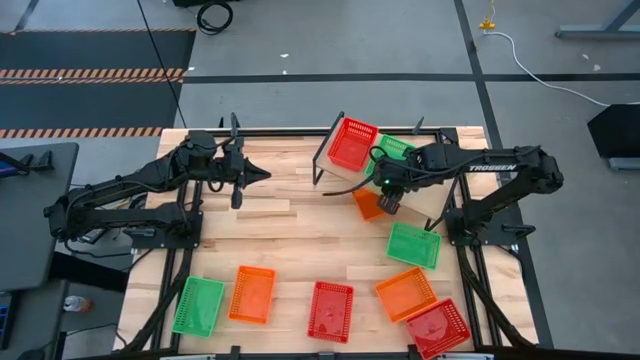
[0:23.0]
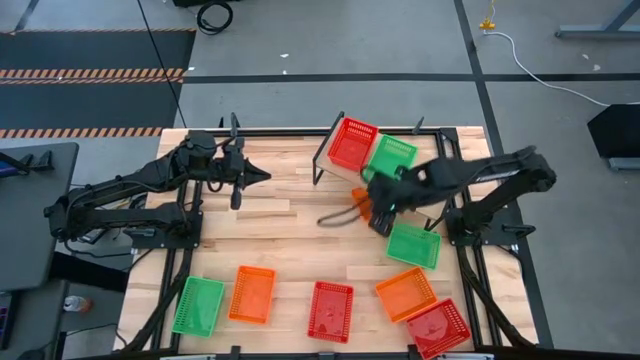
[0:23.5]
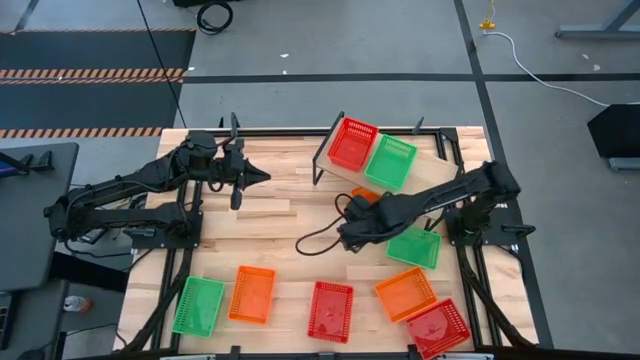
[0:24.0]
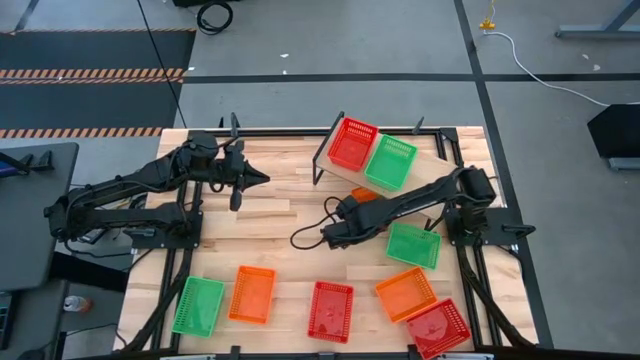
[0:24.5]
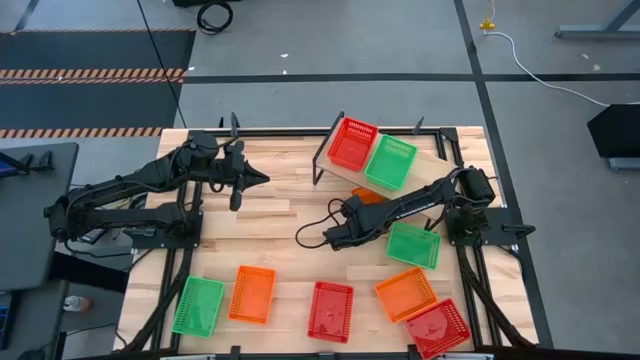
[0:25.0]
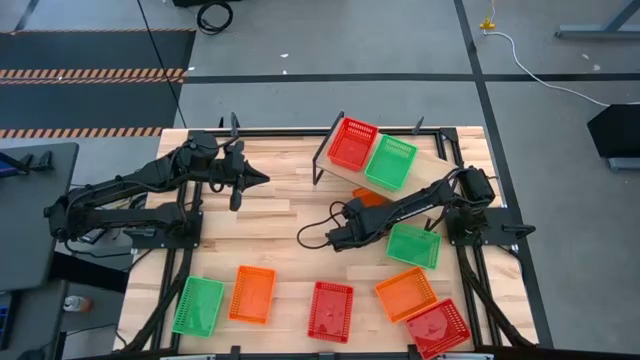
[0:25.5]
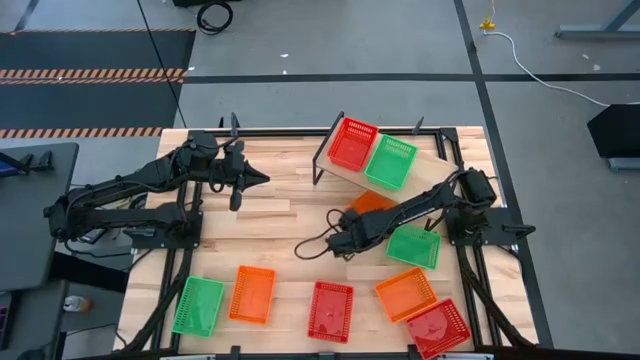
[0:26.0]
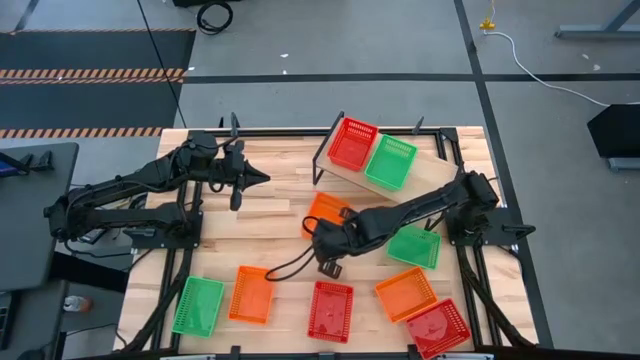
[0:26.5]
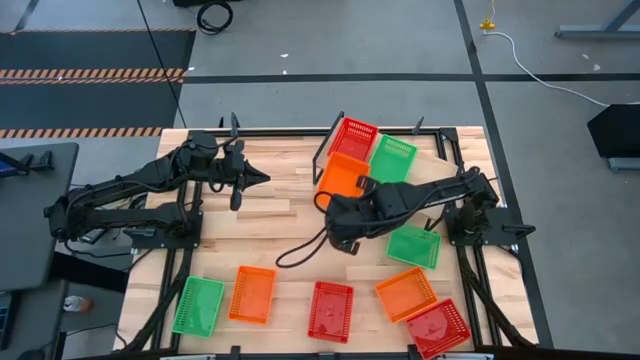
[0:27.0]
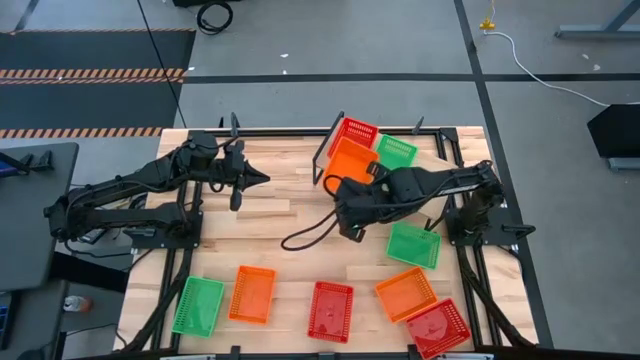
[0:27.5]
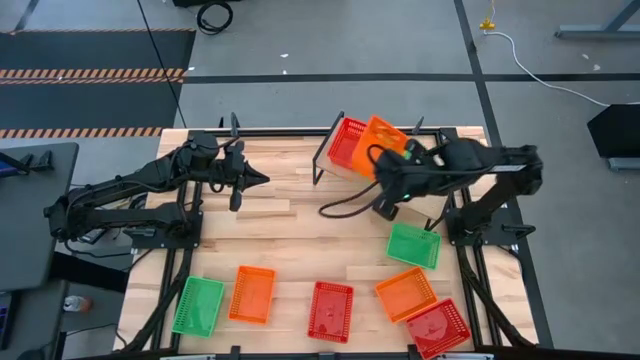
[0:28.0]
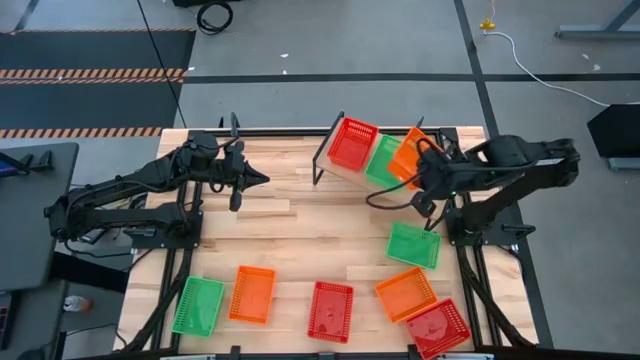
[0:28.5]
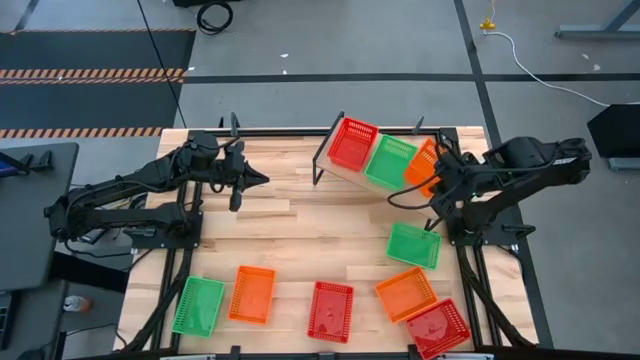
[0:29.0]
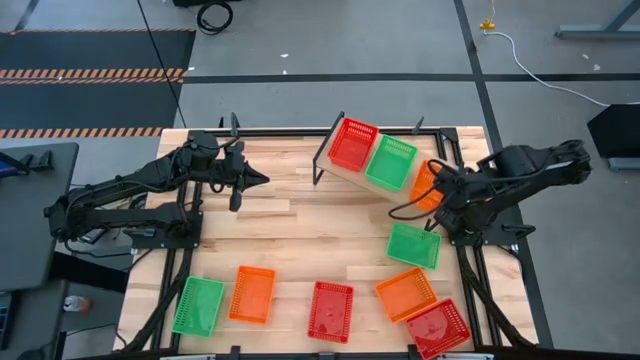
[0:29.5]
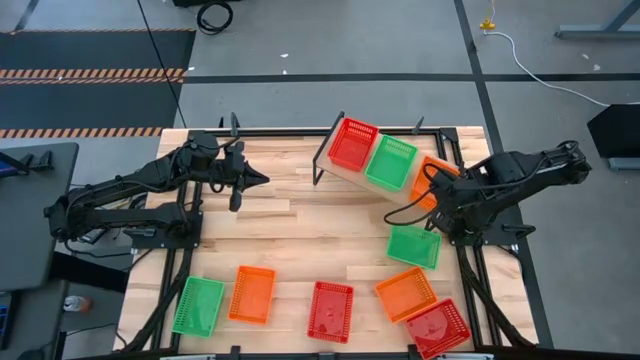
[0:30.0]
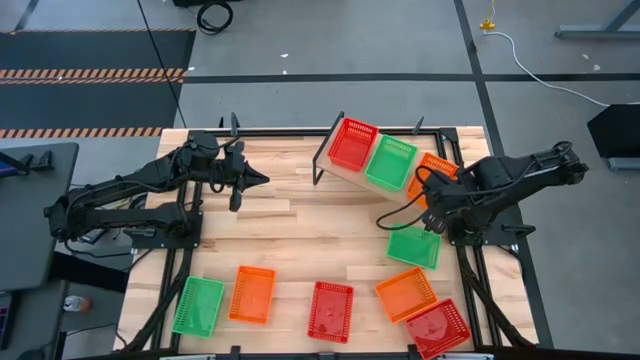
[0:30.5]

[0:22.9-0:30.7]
Task: Stack baskets on shelf by color
Put the top orange bin on the shelf

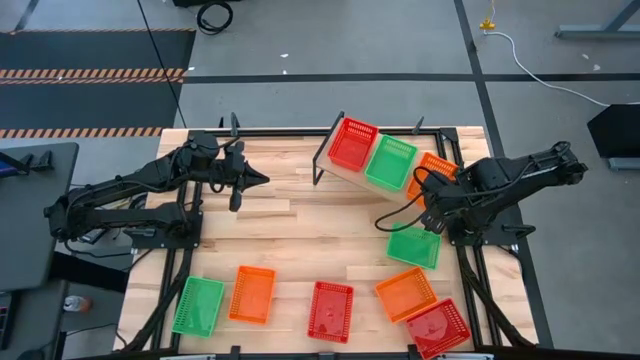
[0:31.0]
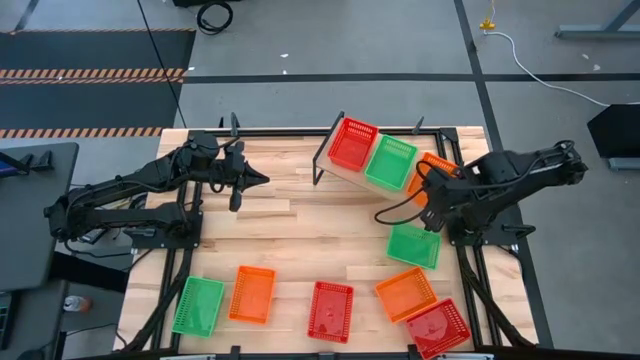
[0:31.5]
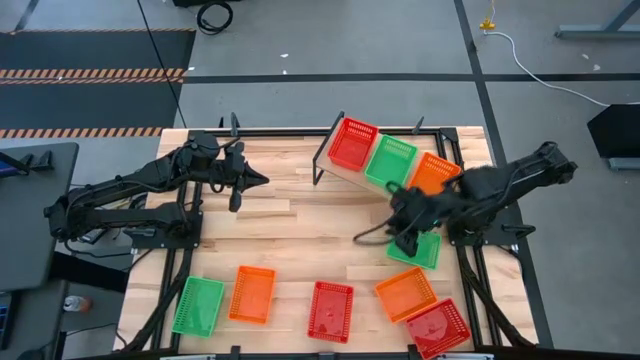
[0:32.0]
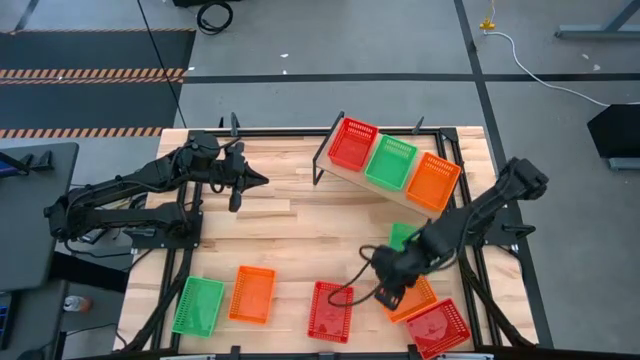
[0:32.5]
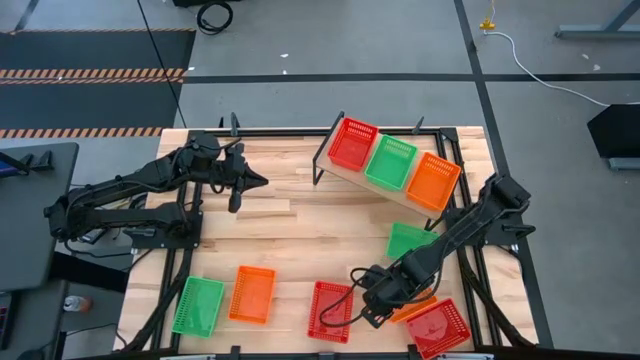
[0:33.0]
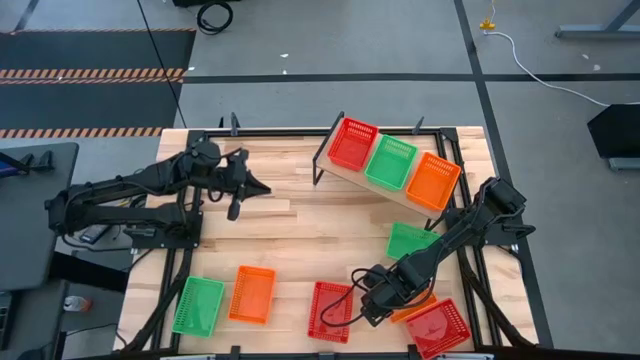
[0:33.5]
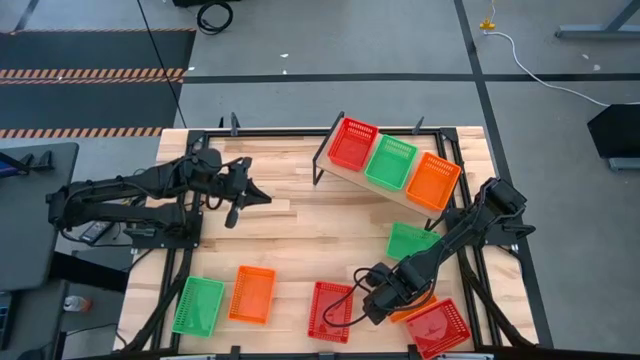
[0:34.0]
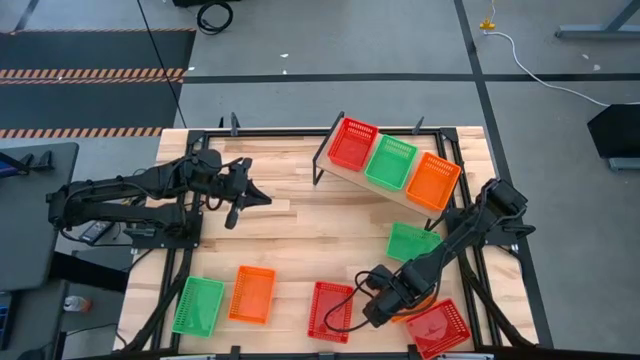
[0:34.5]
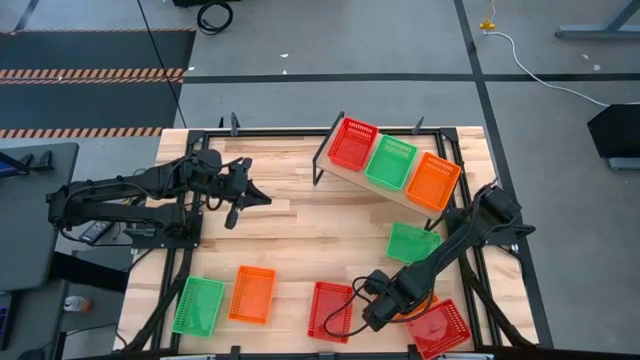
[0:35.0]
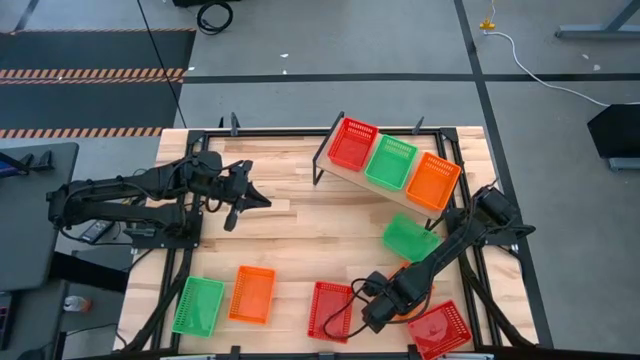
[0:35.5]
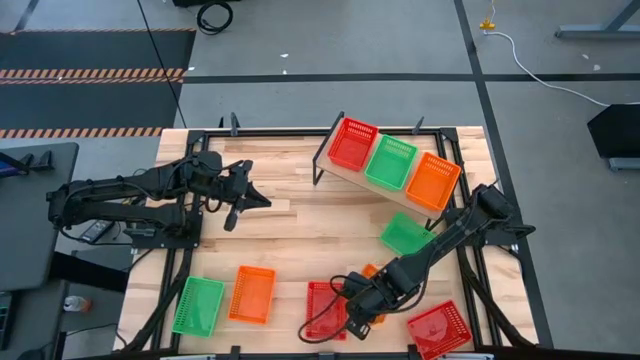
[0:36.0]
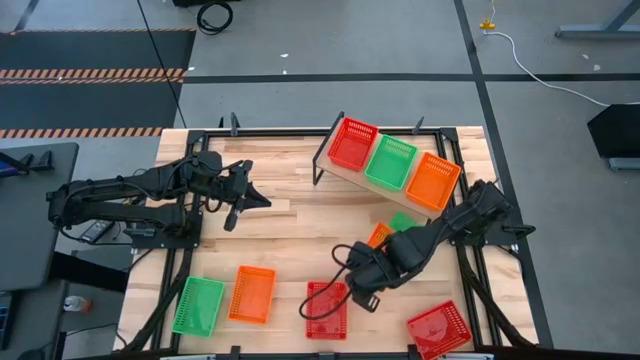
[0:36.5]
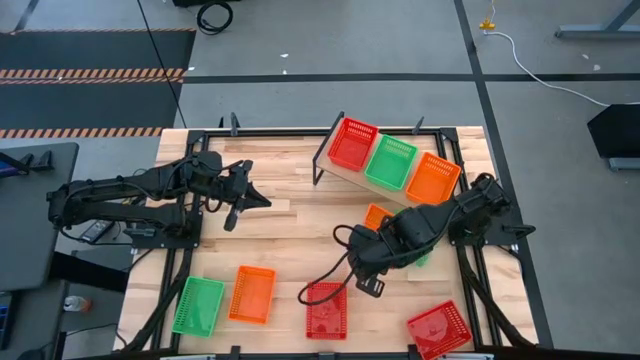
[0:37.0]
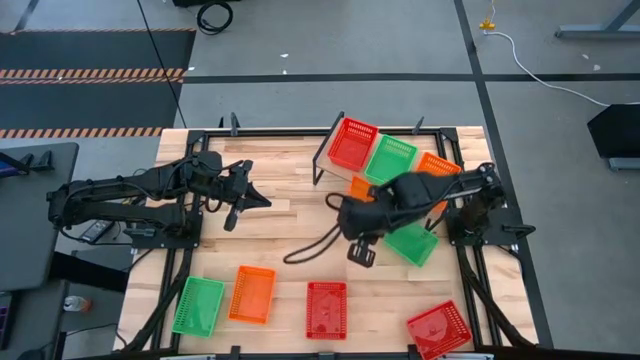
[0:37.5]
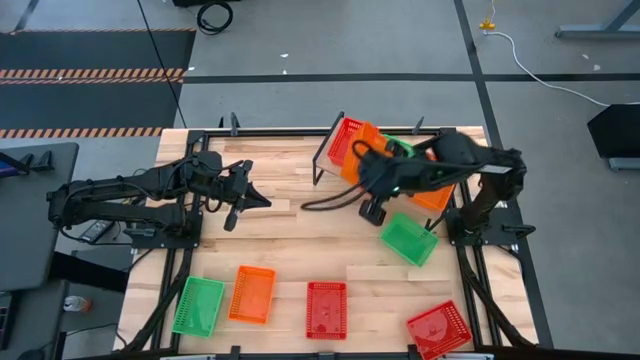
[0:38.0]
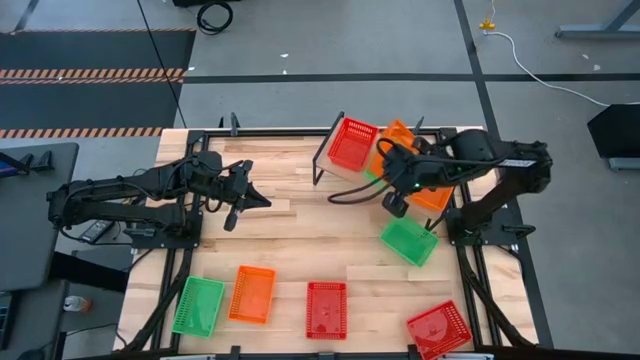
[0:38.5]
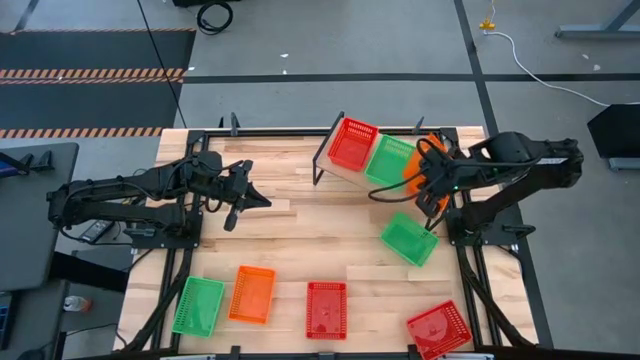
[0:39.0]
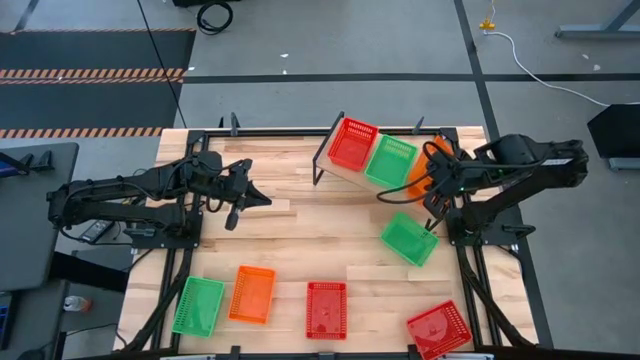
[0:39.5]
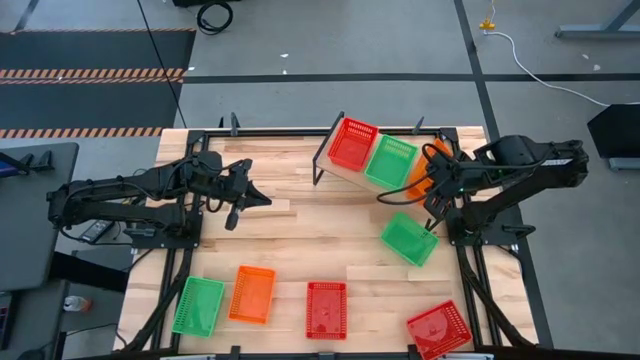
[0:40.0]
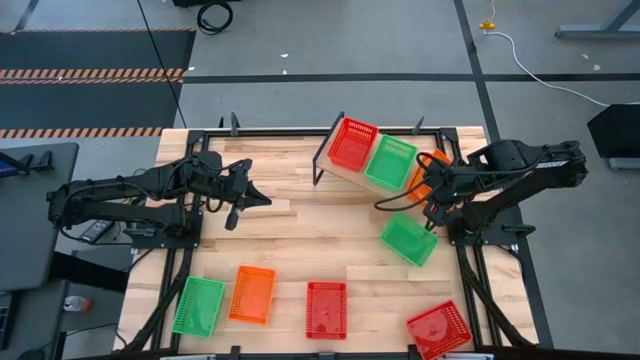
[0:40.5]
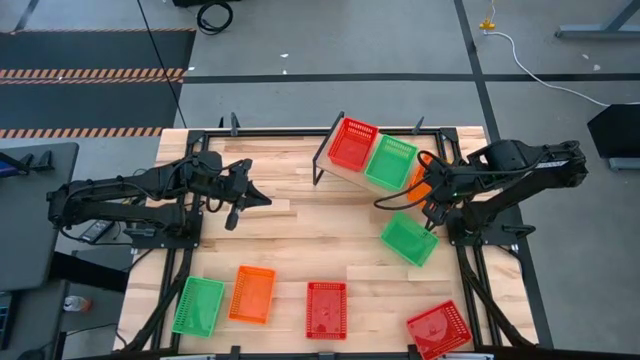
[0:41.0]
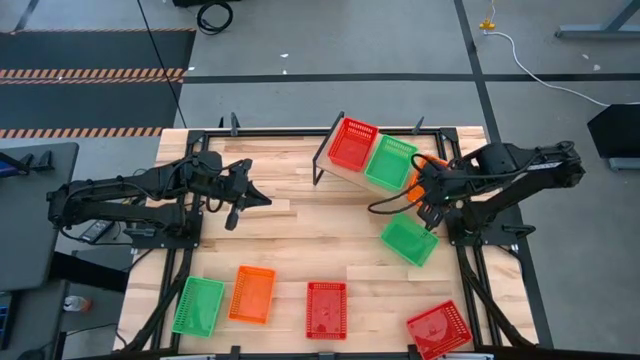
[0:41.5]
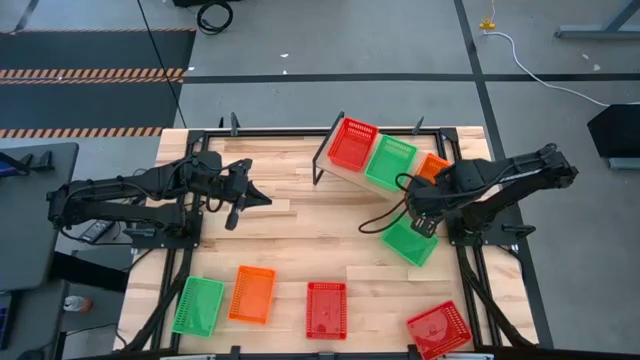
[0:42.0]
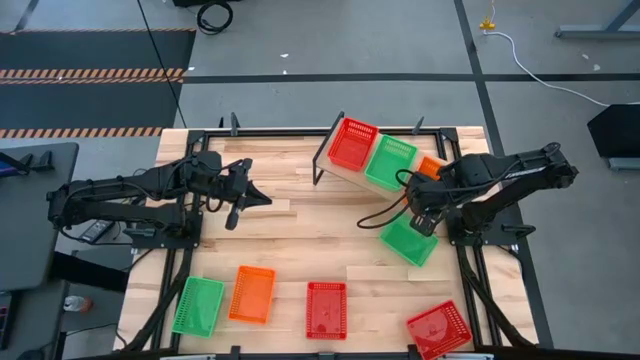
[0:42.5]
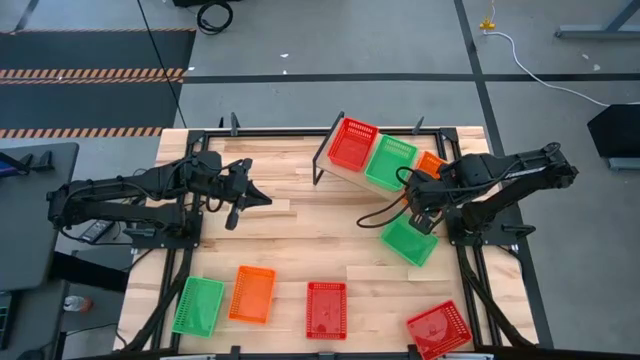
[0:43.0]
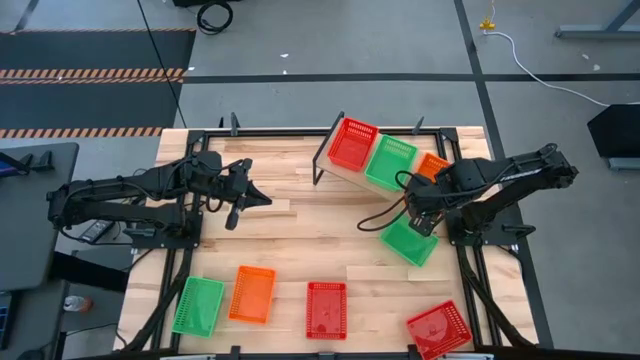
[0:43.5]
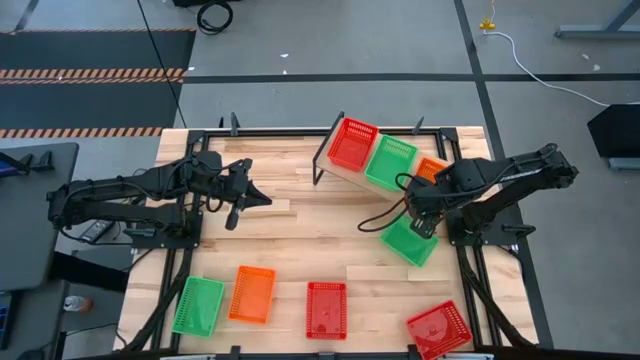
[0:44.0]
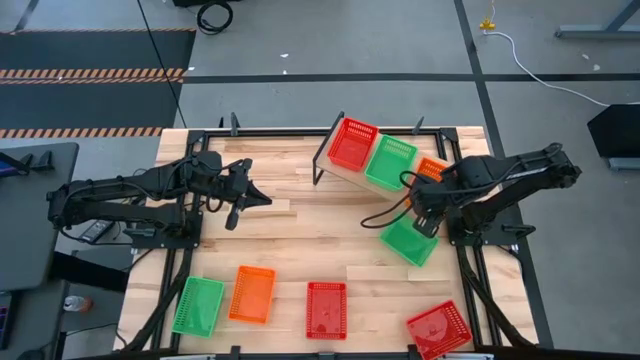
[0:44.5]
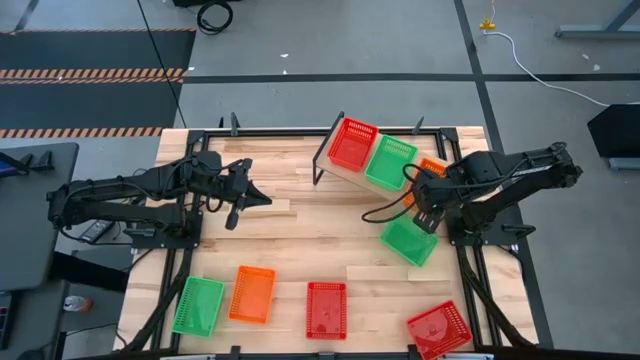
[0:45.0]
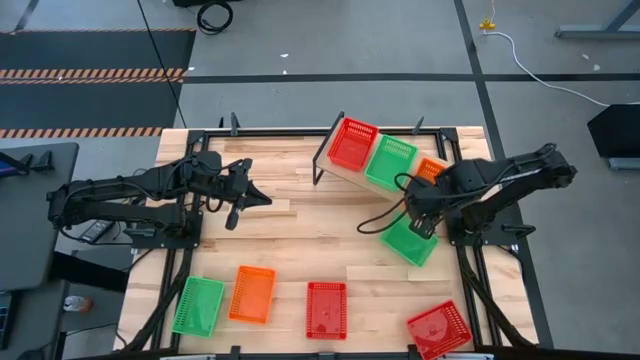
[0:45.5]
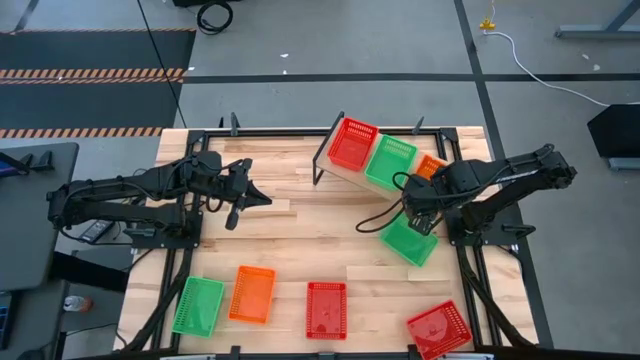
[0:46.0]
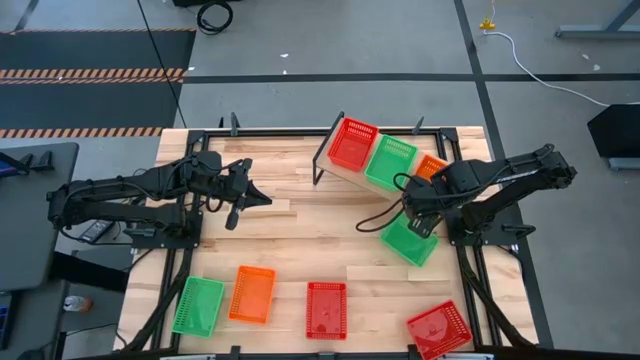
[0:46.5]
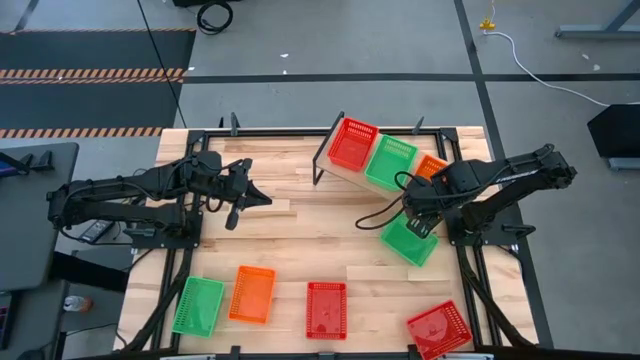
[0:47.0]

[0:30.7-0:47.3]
Stack the right orange bin on the orange bin on the shelf
